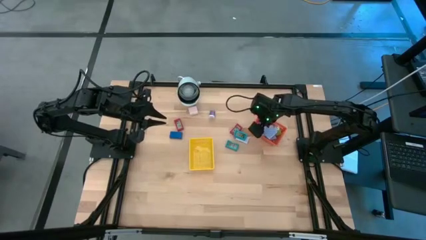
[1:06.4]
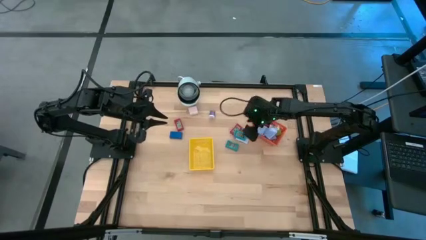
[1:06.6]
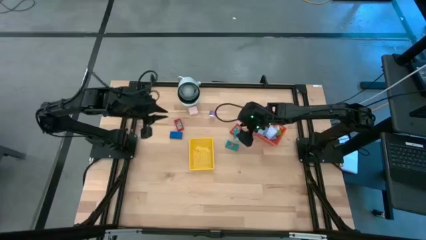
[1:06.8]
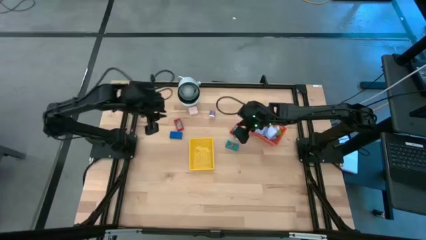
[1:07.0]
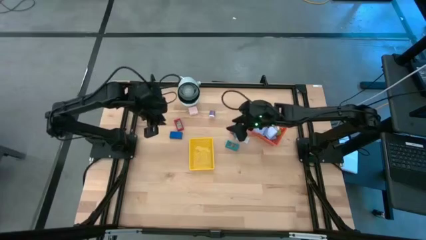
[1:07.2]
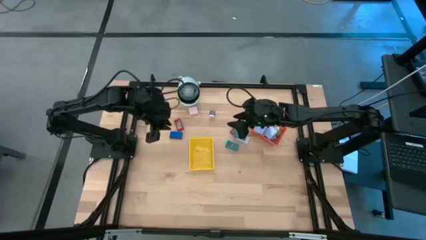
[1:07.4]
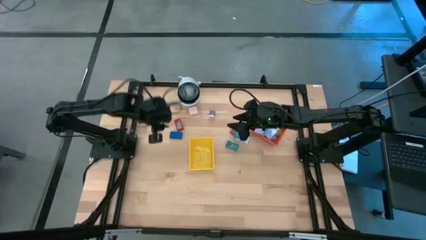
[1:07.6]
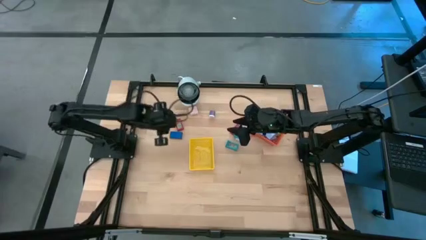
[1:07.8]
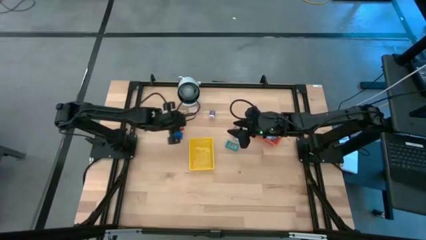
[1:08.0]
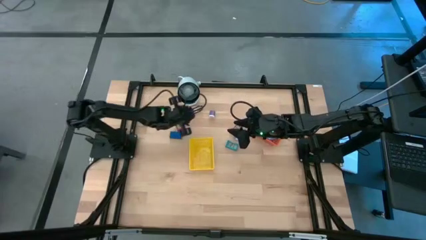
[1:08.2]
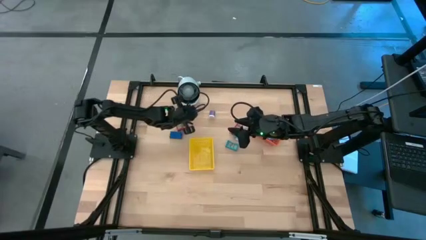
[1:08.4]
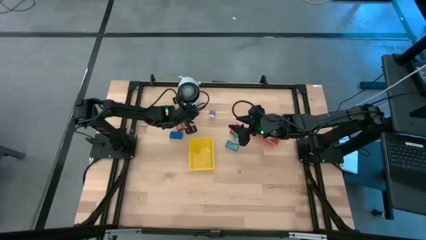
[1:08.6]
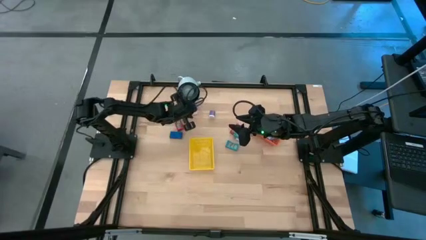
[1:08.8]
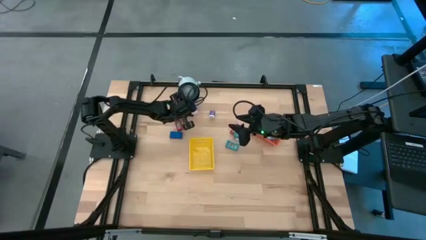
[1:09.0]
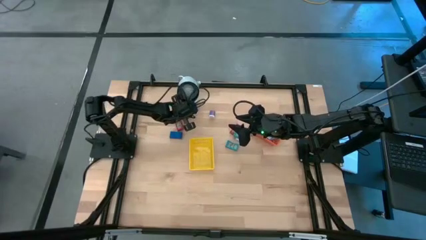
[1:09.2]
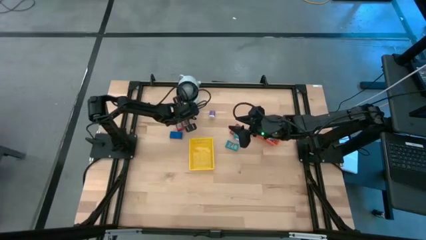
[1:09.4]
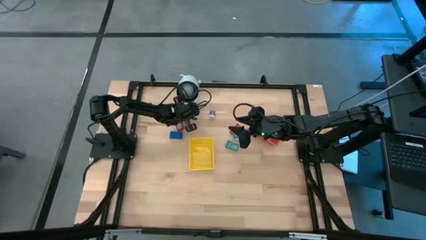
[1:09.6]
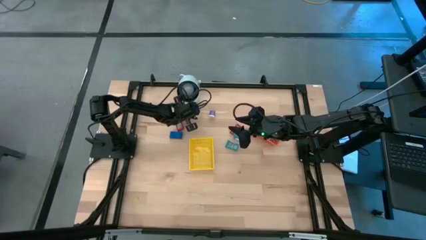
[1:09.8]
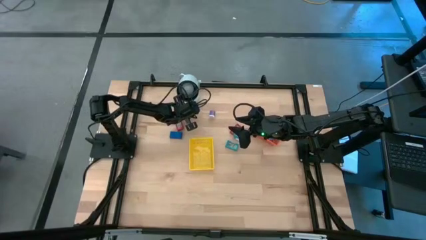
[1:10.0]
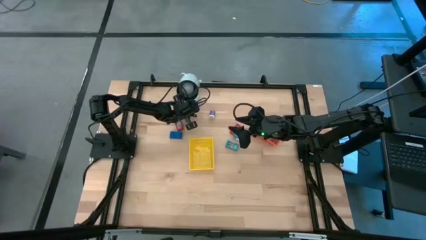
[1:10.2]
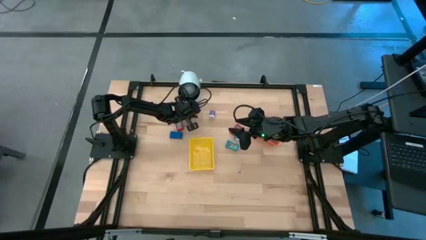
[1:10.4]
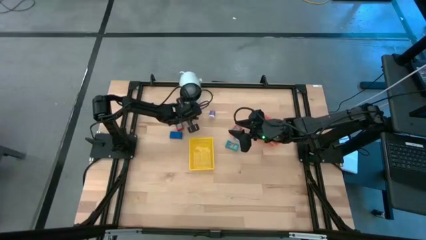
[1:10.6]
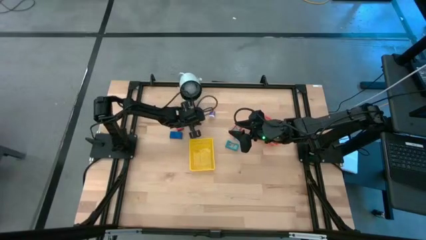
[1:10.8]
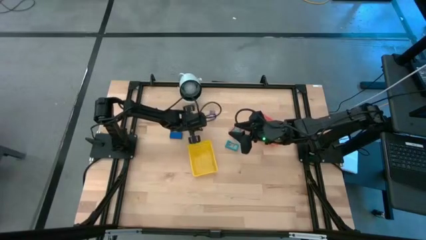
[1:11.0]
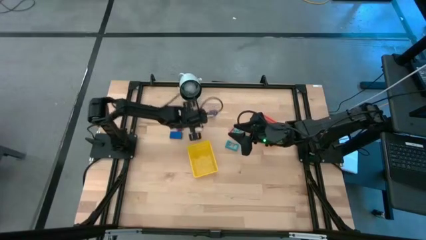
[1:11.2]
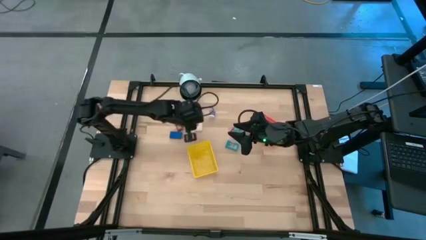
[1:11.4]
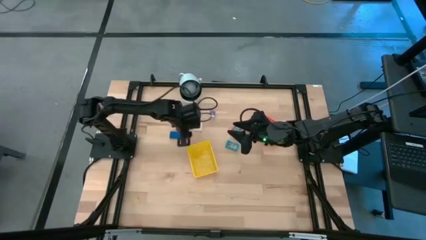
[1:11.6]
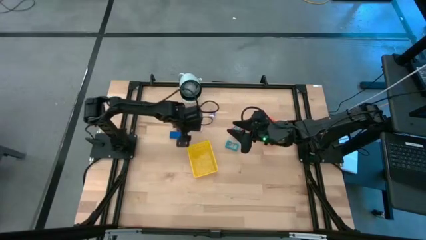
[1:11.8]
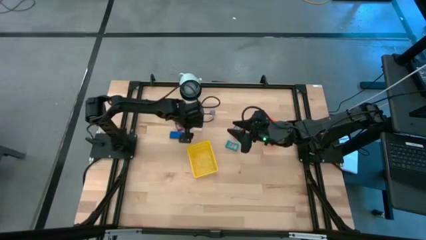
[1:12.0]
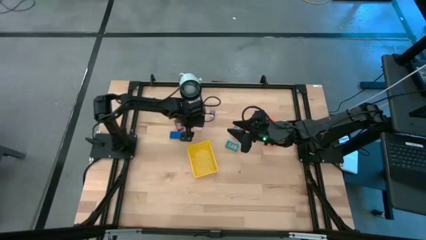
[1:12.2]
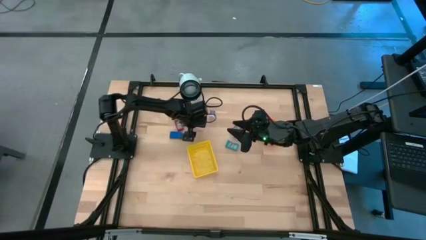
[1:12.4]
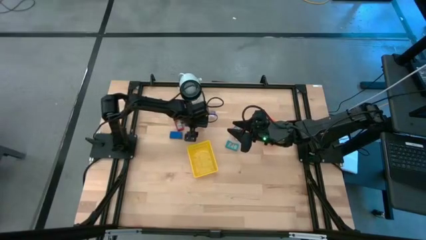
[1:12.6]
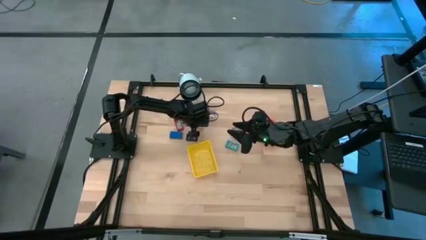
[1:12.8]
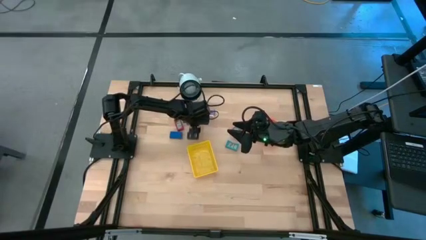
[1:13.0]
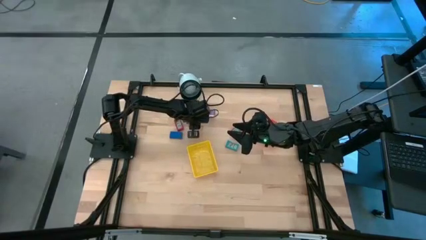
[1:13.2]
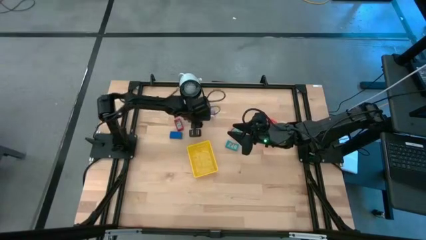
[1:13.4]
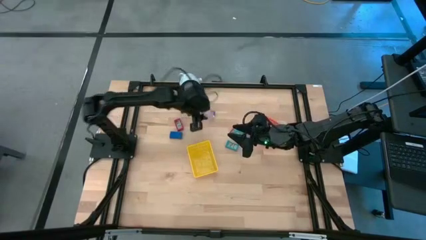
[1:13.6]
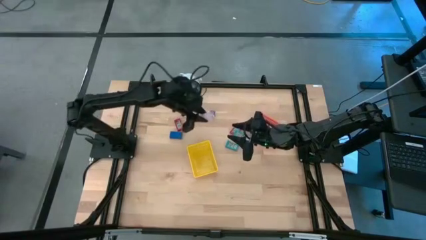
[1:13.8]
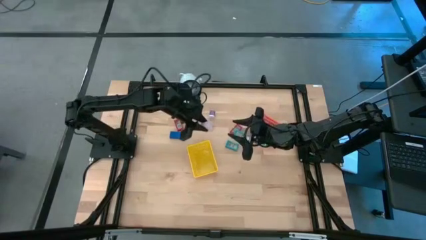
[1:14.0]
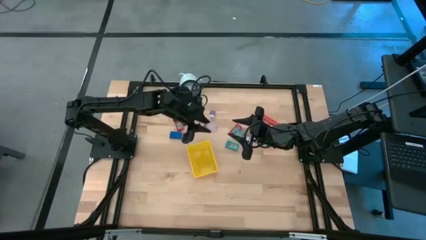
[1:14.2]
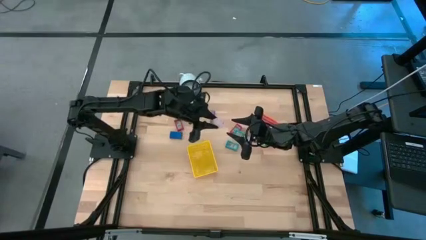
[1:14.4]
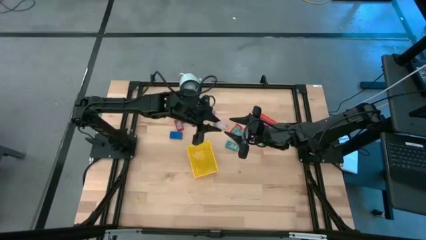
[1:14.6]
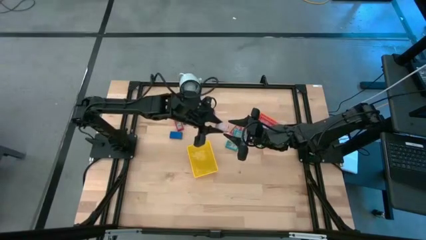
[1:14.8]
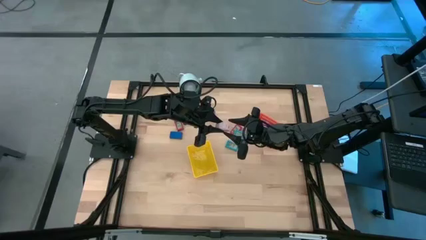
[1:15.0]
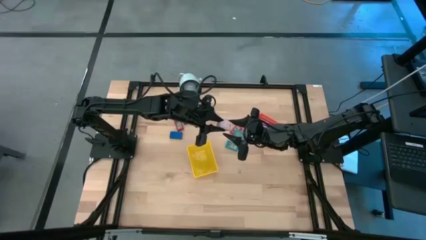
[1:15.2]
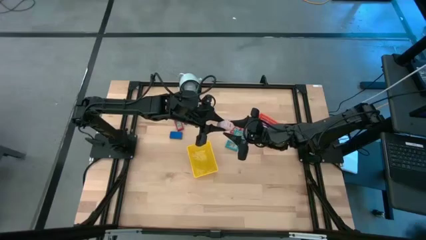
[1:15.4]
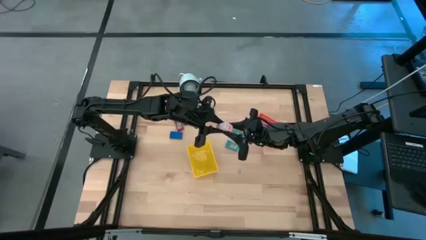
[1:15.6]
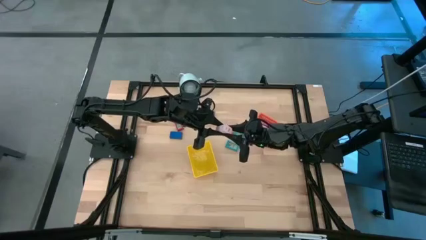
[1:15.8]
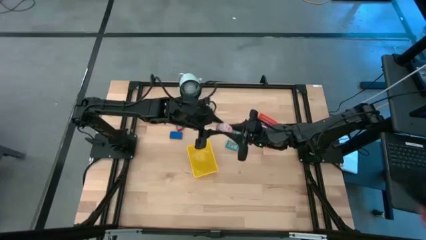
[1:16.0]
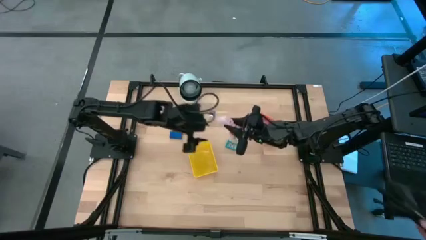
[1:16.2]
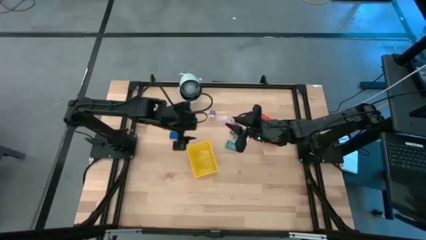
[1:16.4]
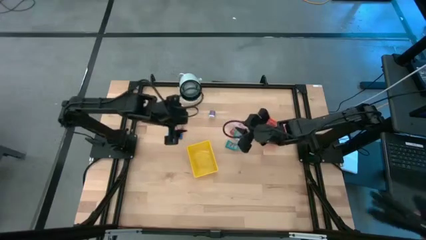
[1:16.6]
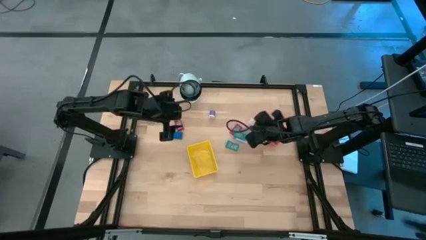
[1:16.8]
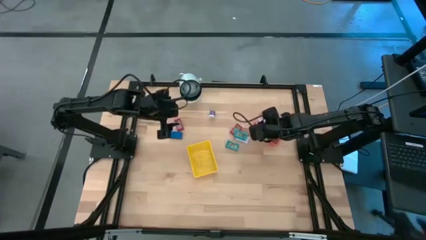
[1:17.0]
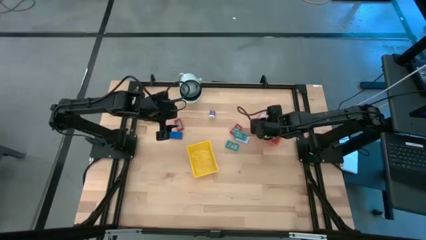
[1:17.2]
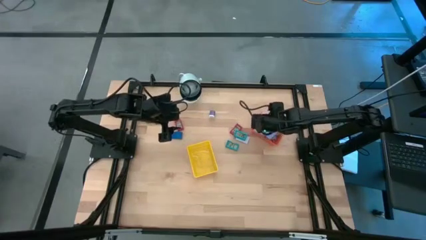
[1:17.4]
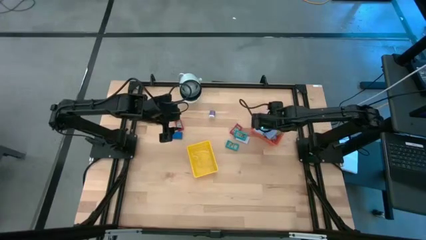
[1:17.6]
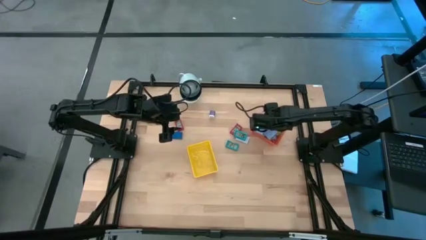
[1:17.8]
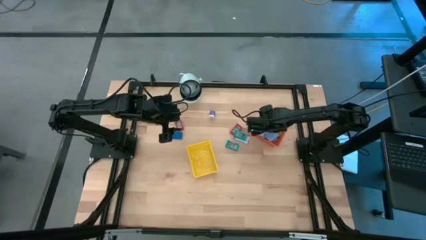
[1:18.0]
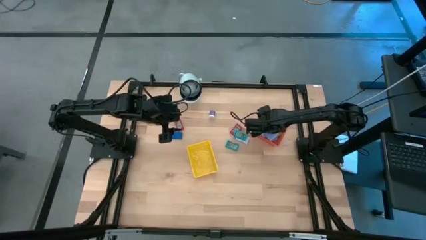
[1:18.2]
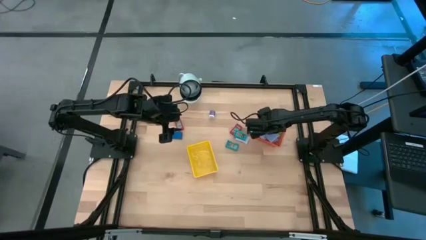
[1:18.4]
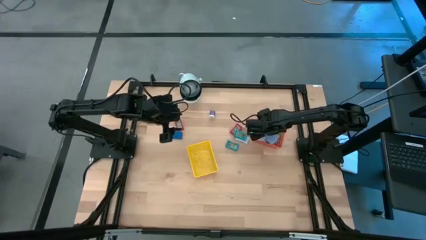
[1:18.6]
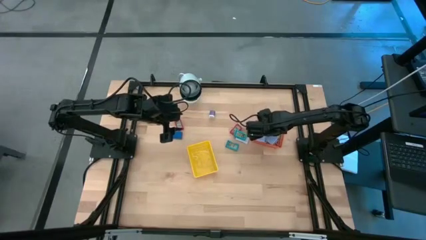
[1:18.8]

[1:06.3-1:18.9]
Task: Pick & Place Office items
Put the pink charger adapter into the orange basket

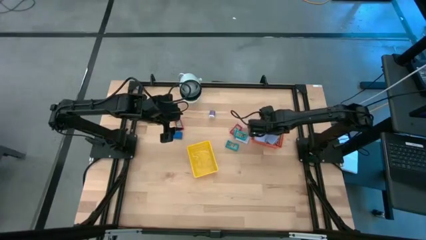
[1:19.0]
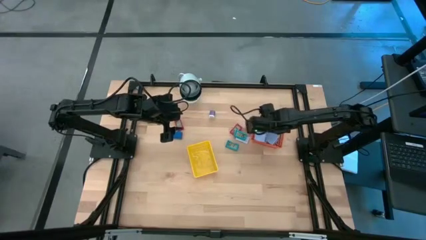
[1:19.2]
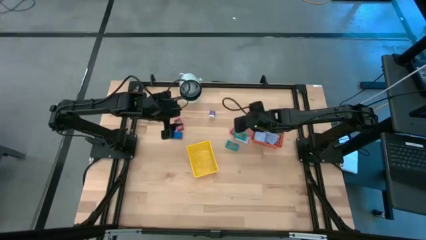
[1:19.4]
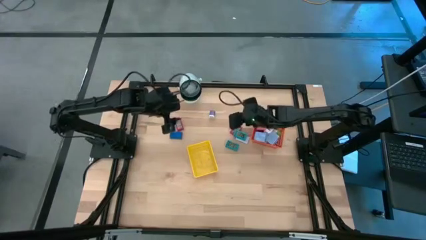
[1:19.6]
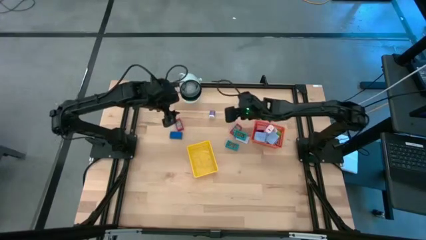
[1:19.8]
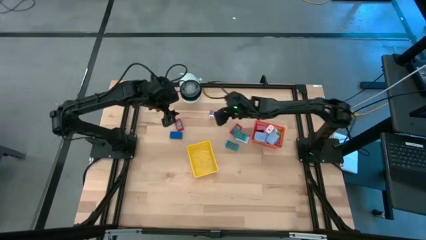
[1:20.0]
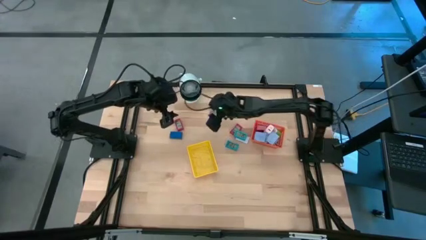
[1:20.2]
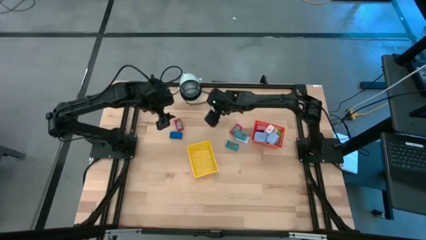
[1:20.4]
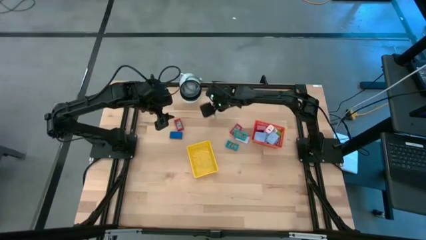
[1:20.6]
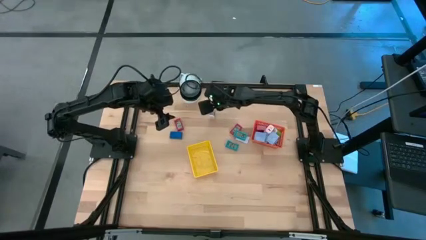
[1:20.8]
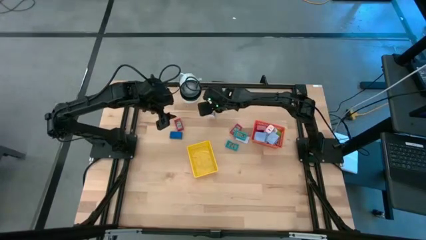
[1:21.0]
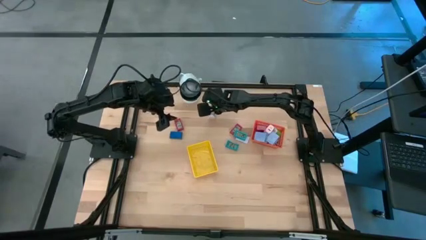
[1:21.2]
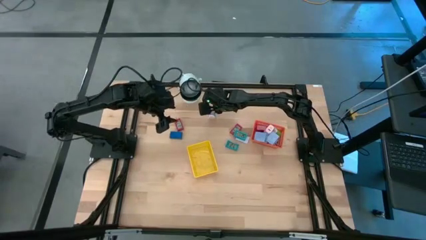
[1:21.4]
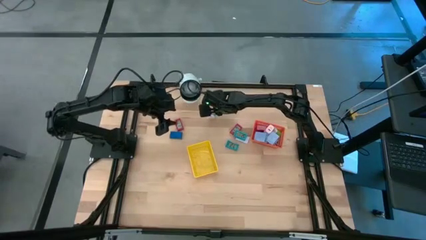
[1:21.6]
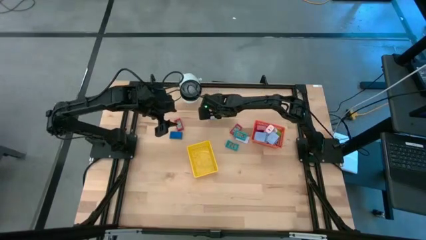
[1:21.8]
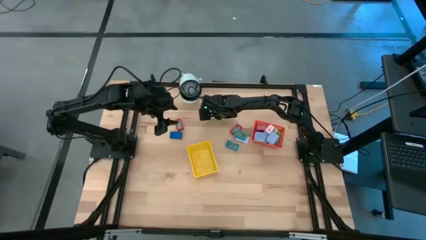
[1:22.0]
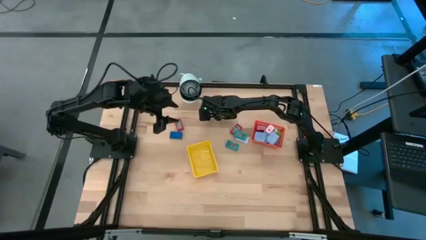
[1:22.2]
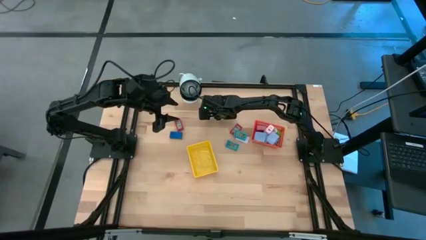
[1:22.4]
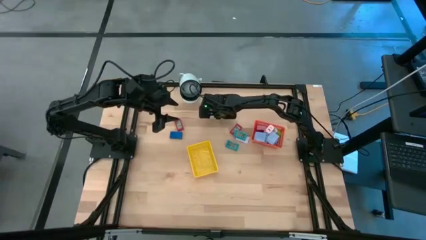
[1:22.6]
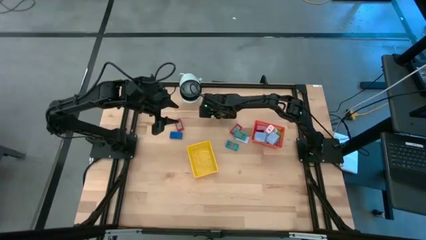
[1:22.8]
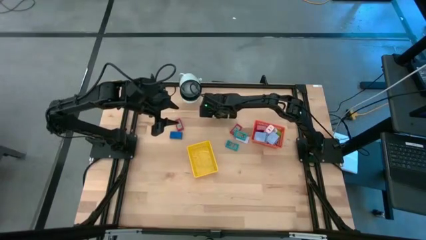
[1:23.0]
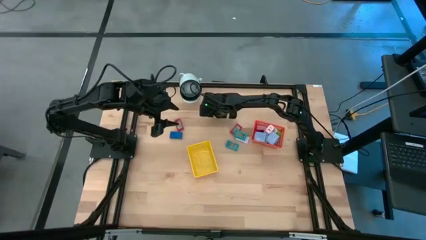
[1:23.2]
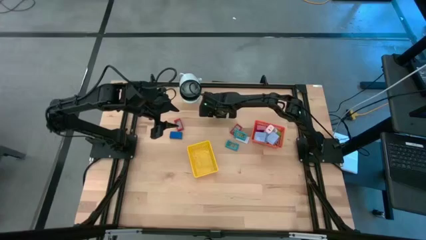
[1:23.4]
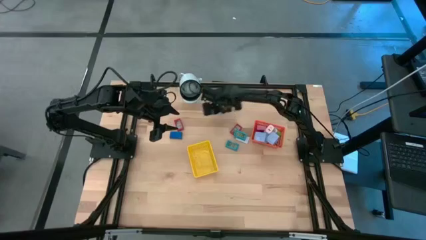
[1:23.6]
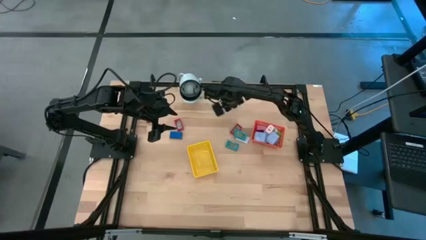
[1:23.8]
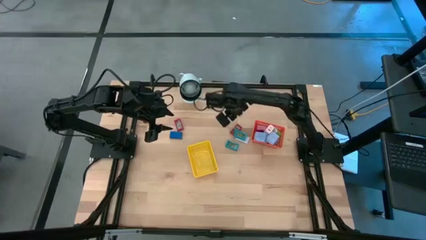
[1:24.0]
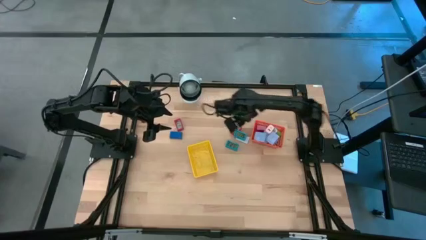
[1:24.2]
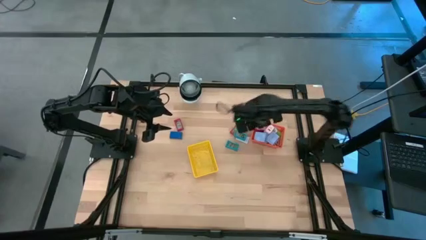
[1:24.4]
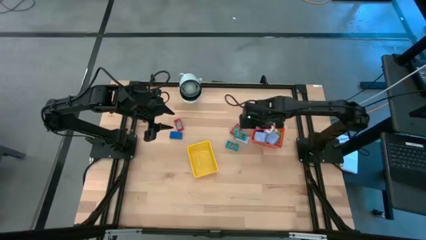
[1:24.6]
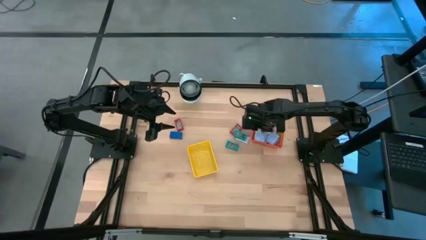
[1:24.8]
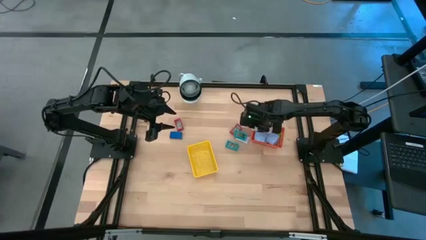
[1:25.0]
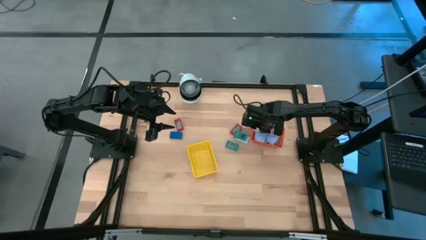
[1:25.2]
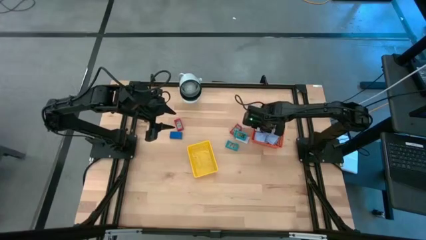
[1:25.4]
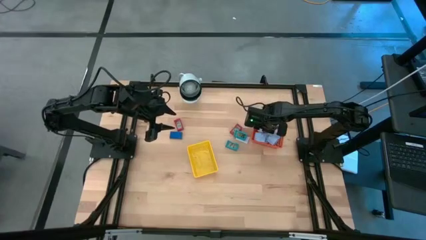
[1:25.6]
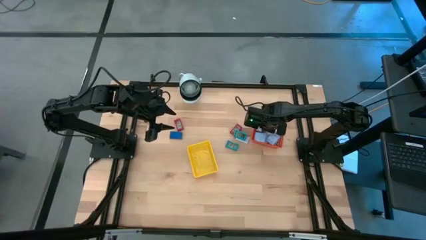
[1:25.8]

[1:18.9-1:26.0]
Put the violet charger adapter into the orange basket
